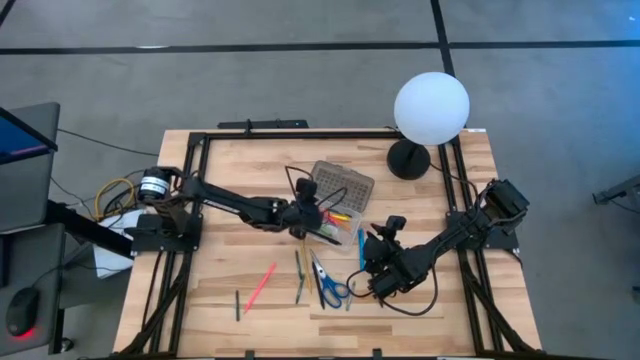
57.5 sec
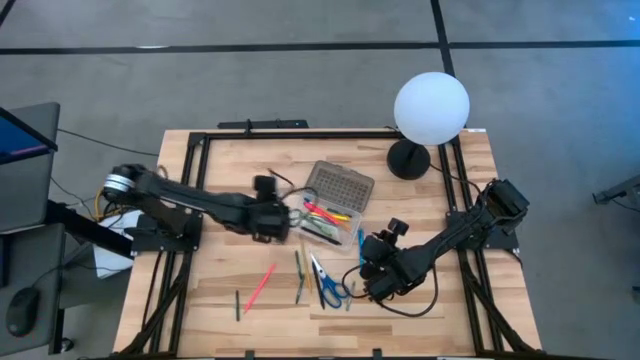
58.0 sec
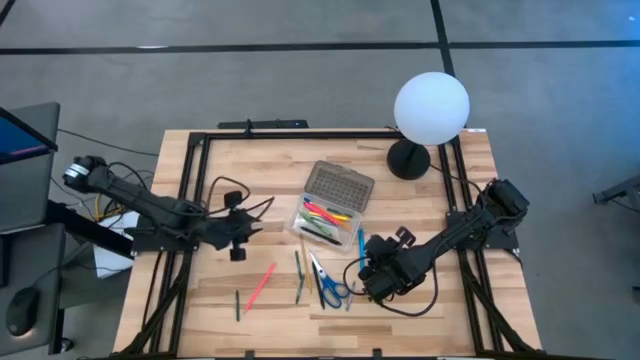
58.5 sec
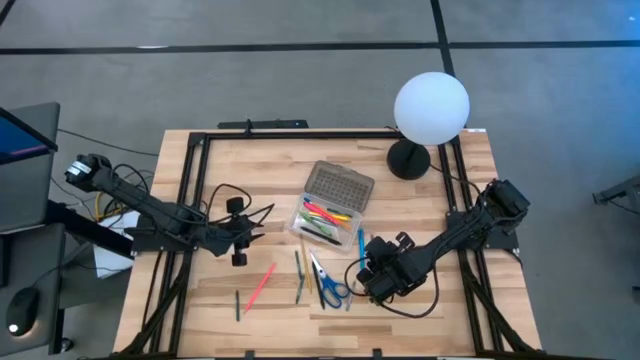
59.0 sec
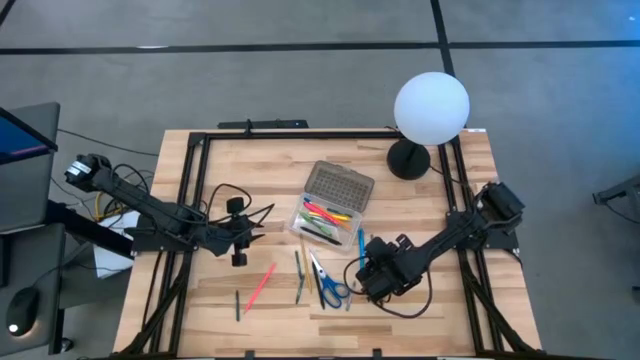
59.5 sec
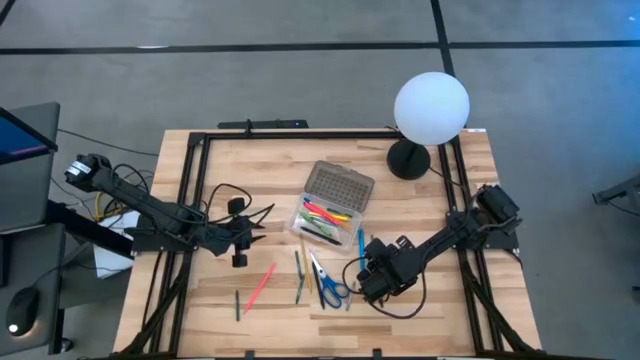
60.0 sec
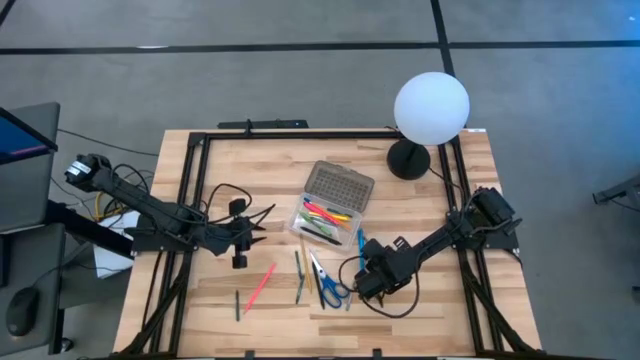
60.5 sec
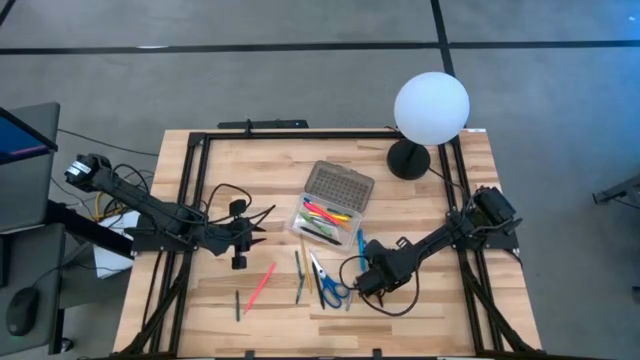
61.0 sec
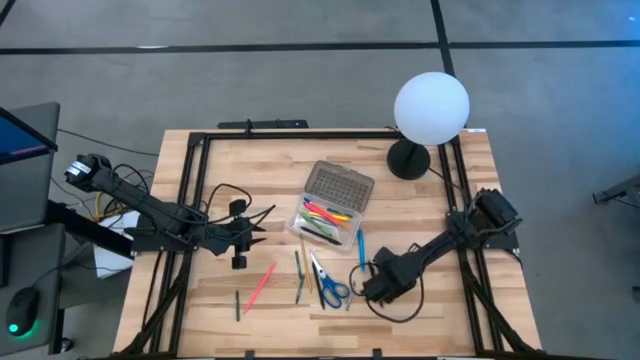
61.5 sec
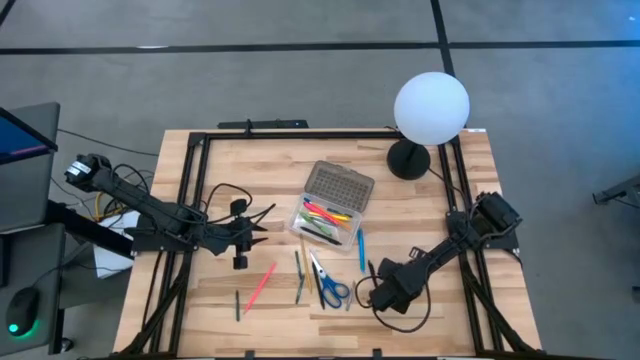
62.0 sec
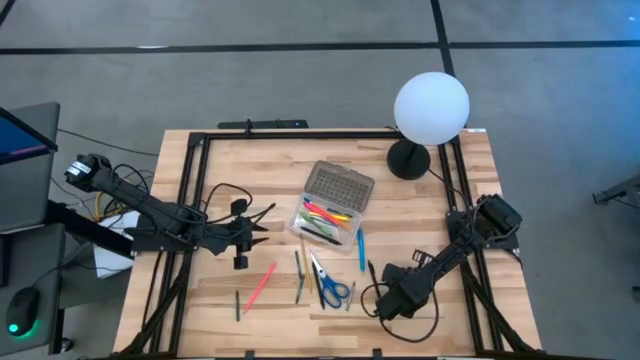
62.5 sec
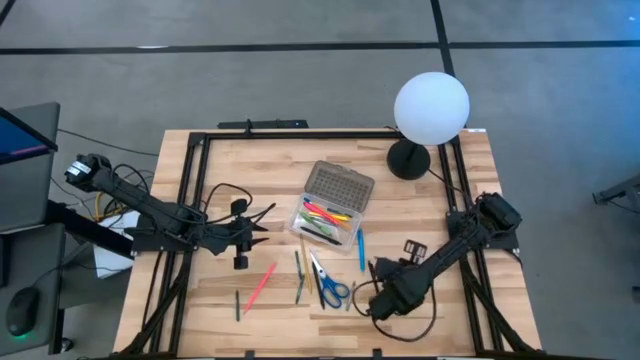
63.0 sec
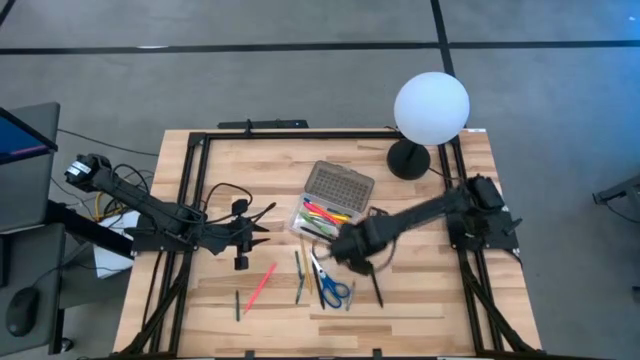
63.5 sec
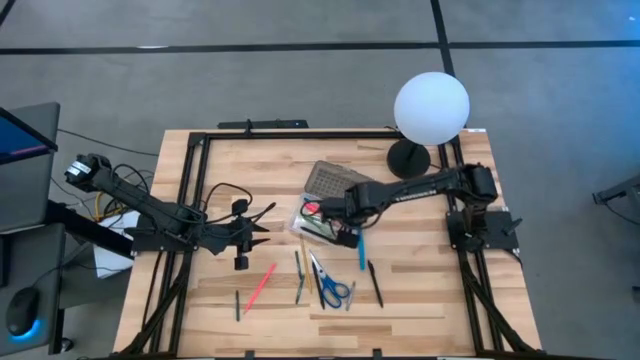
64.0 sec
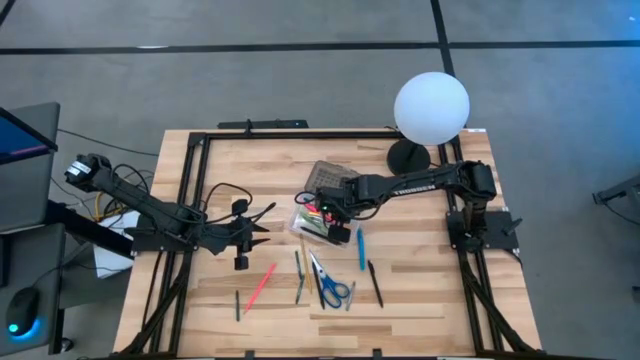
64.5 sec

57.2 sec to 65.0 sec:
Task: Pick & place school supplies into a supply box
Put the gray pen into the gray supply box

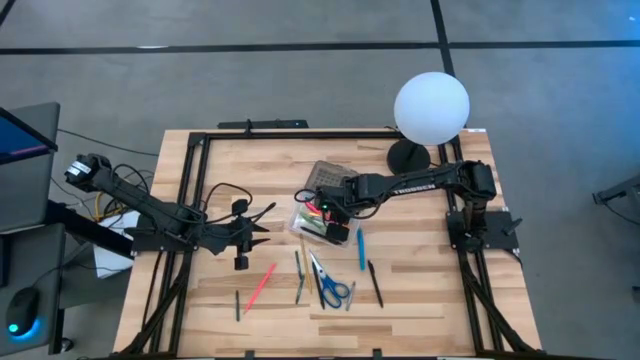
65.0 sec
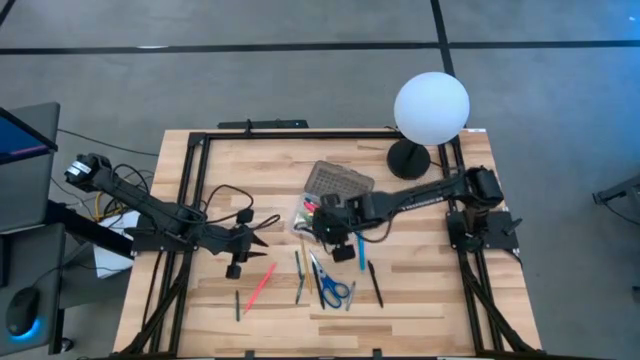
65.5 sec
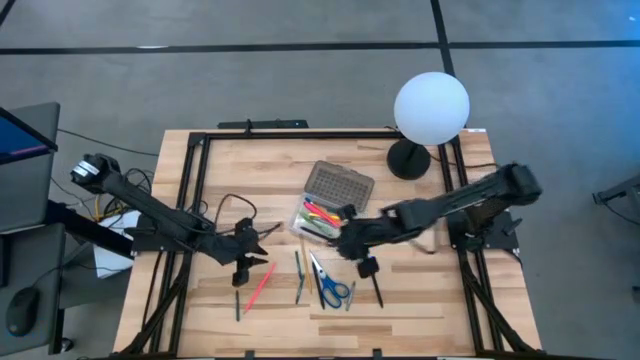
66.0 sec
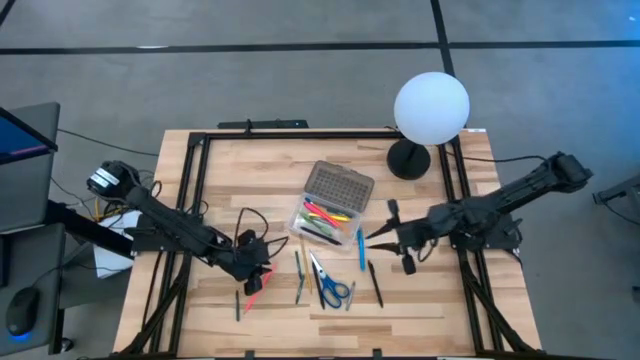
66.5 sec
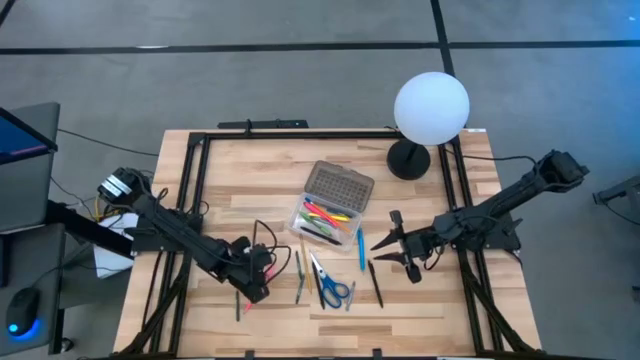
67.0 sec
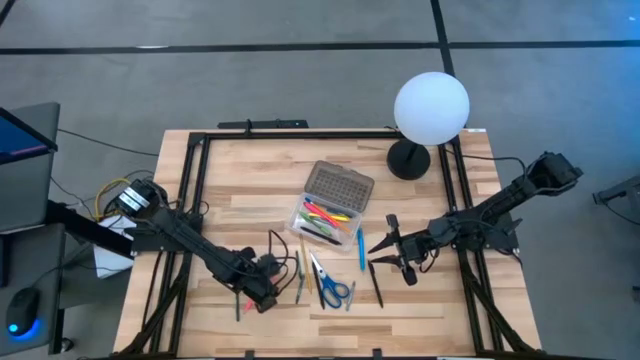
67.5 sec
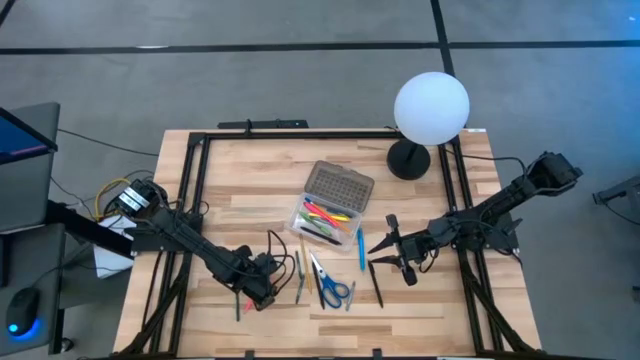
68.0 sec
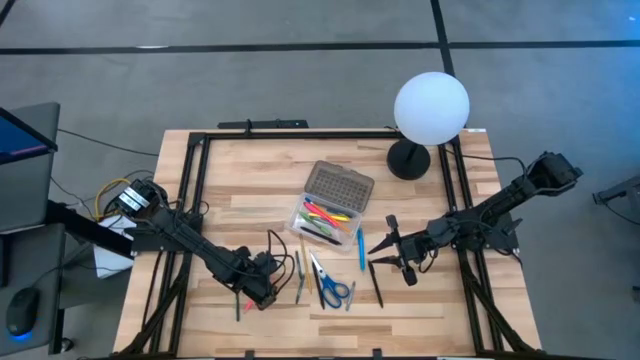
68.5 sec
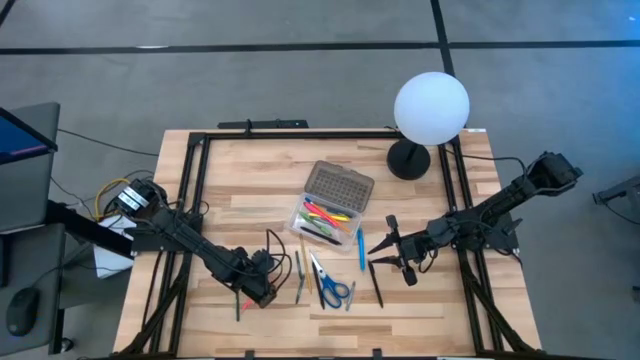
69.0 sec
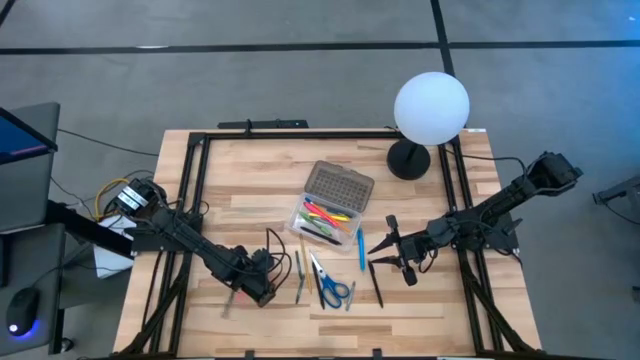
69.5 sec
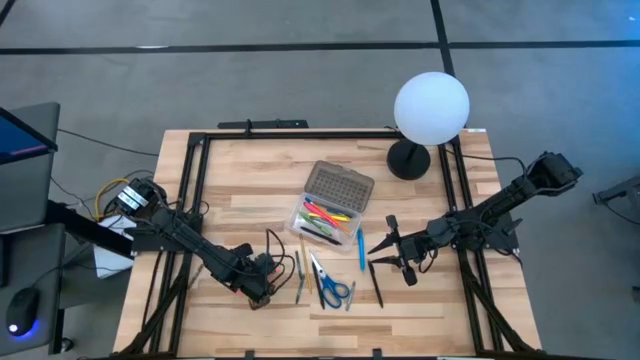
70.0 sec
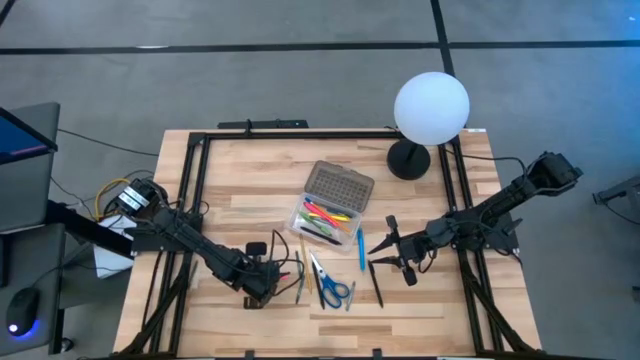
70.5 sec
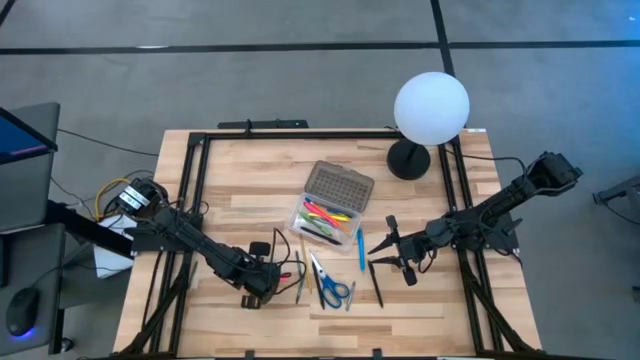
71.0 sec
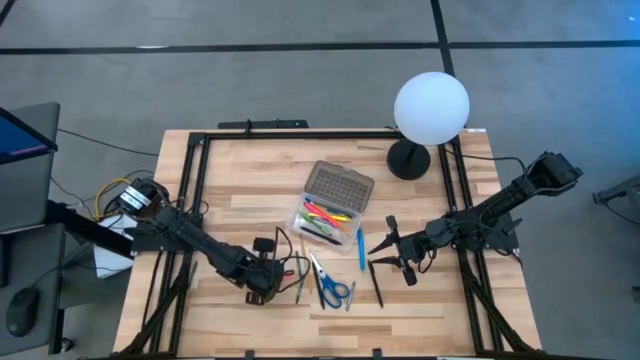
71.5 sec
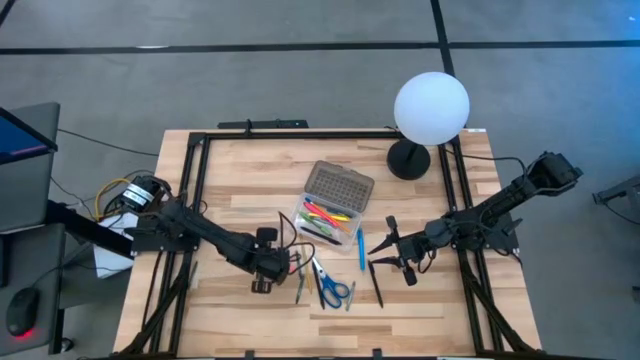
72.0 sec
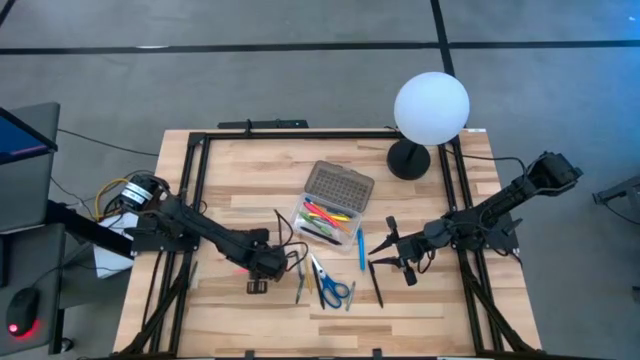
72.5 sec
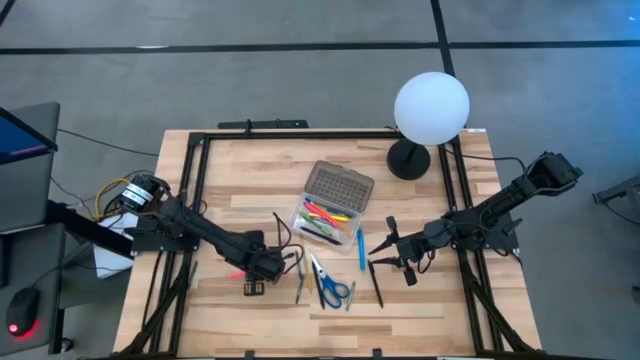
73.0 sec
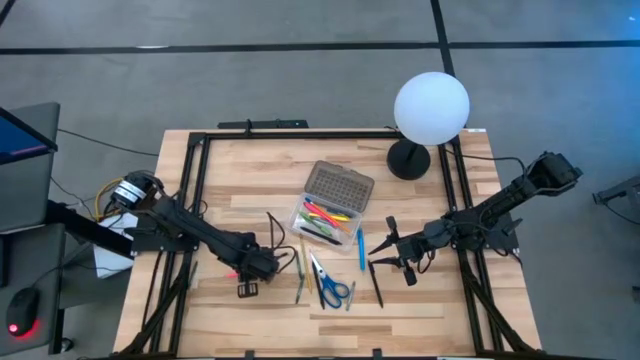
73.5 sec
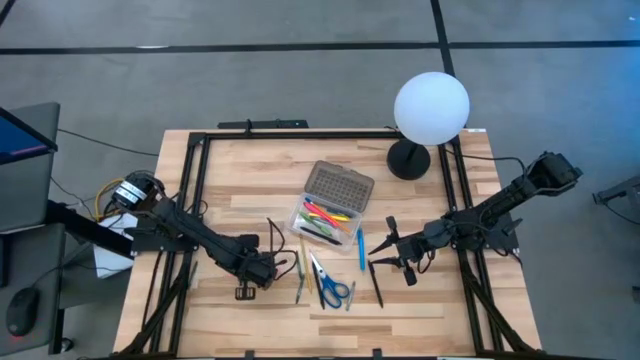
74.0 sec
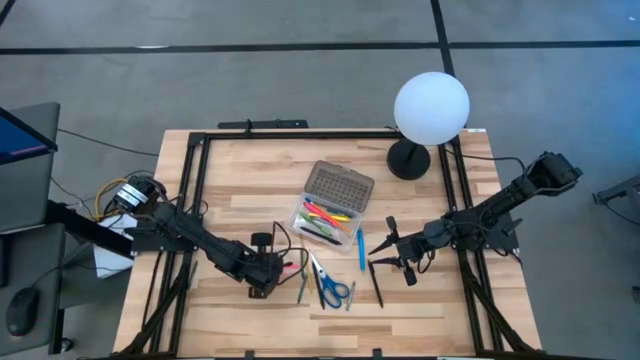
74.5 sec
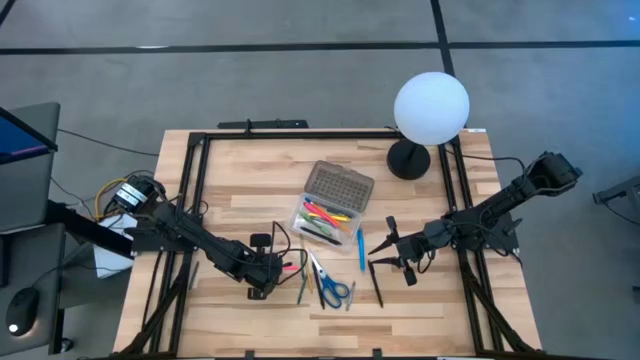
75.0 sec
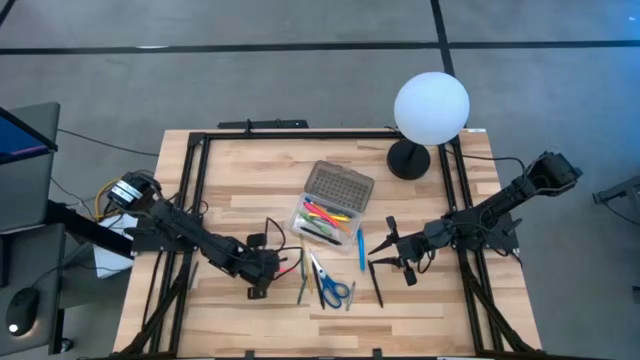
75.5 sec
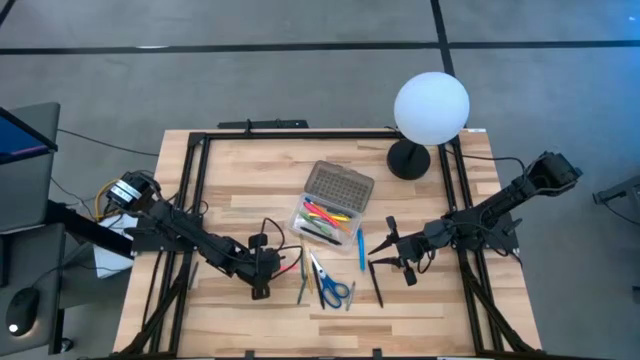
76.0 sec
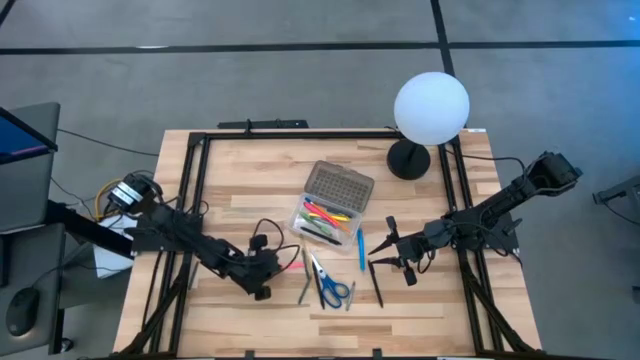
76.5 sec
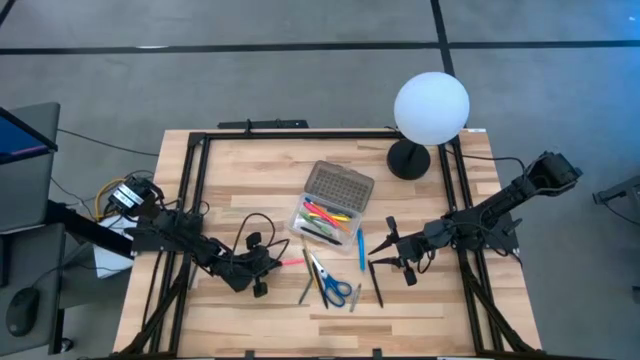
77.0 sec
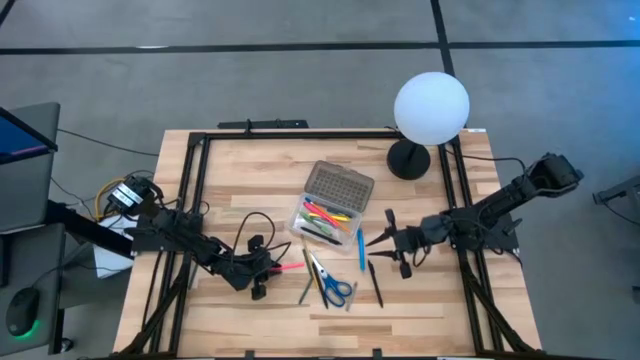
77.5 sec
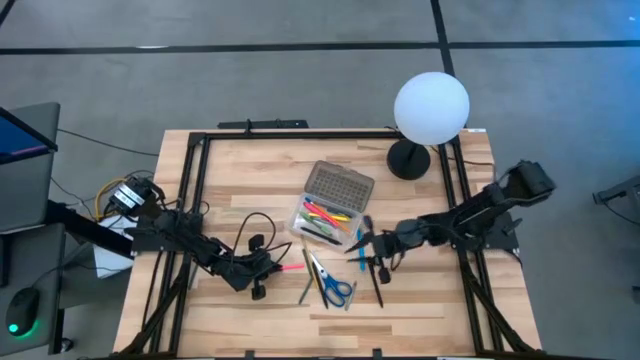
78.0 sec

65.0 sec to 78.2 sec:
Put the pink pencil into the gray supply box
